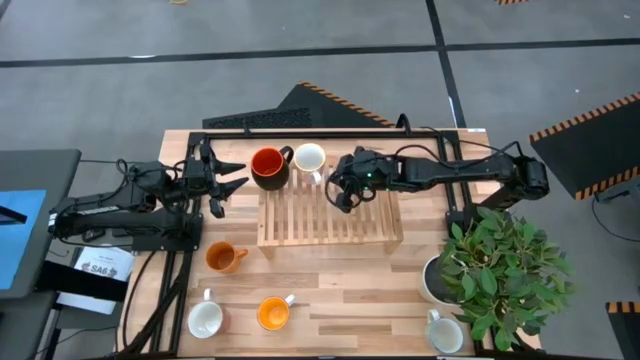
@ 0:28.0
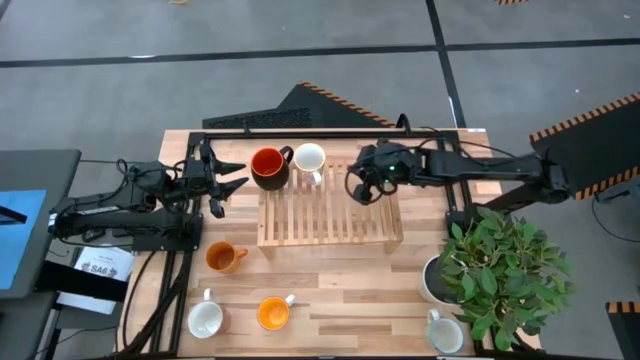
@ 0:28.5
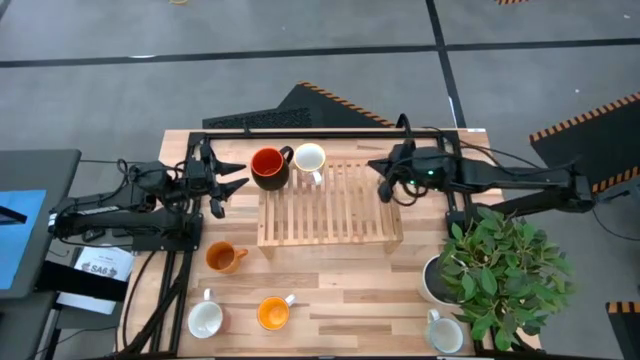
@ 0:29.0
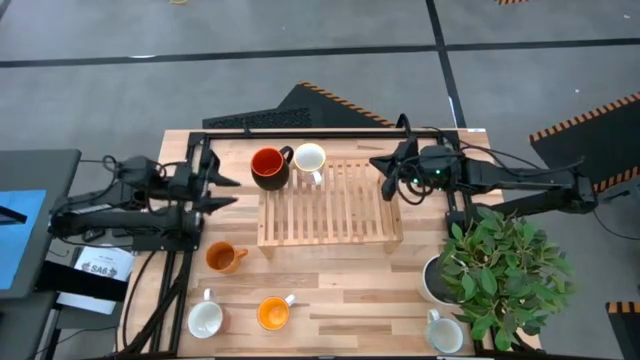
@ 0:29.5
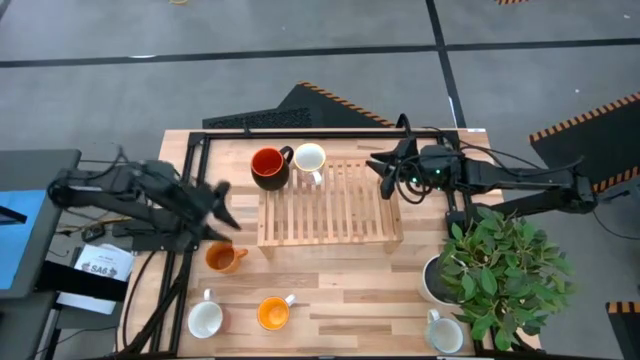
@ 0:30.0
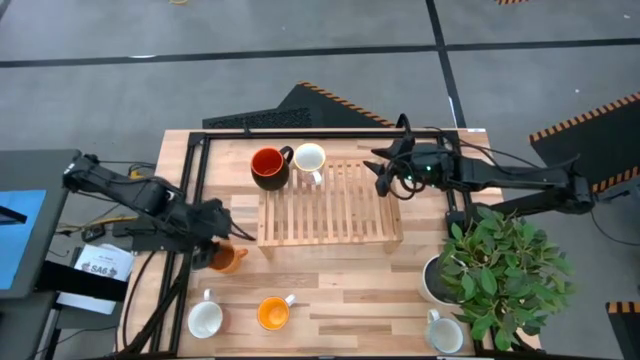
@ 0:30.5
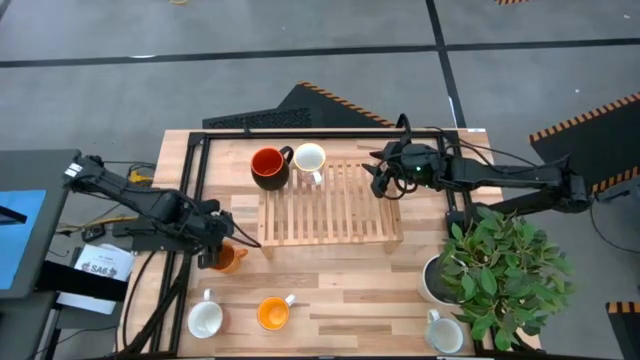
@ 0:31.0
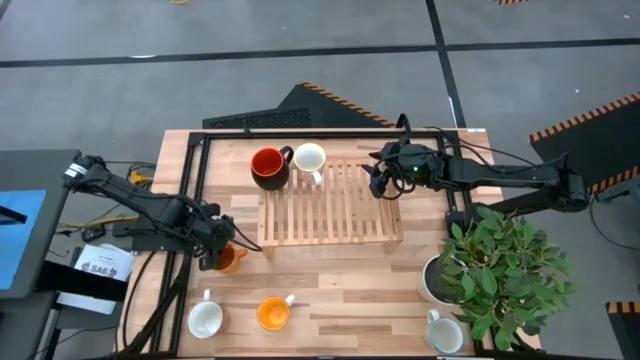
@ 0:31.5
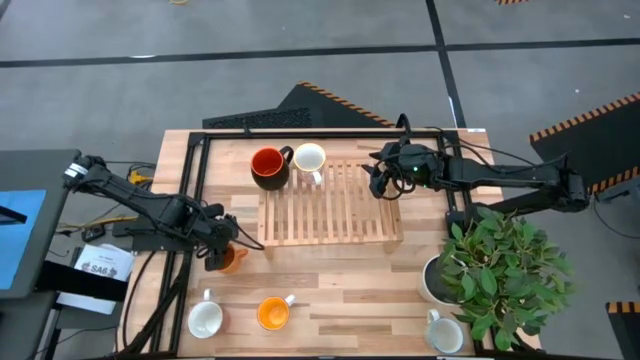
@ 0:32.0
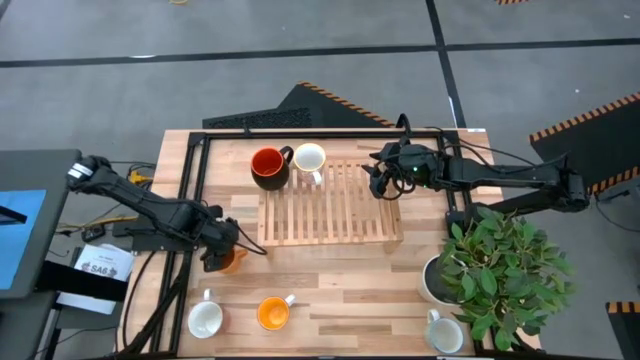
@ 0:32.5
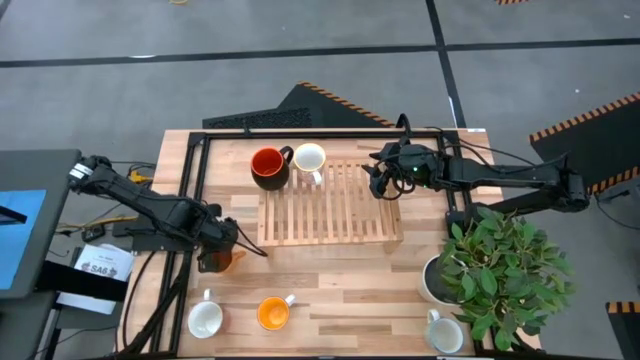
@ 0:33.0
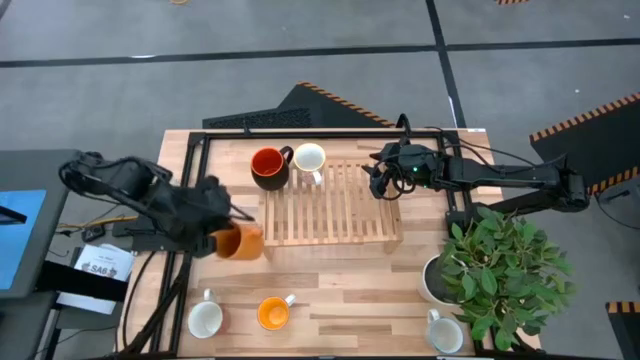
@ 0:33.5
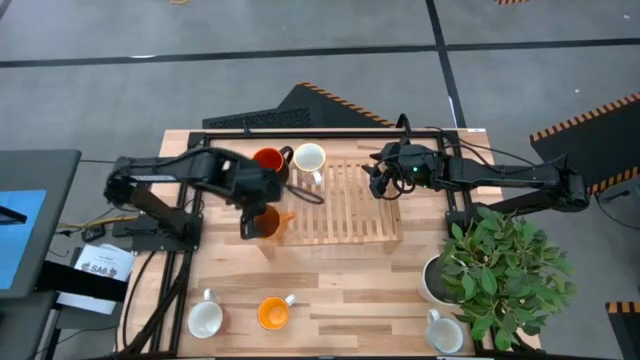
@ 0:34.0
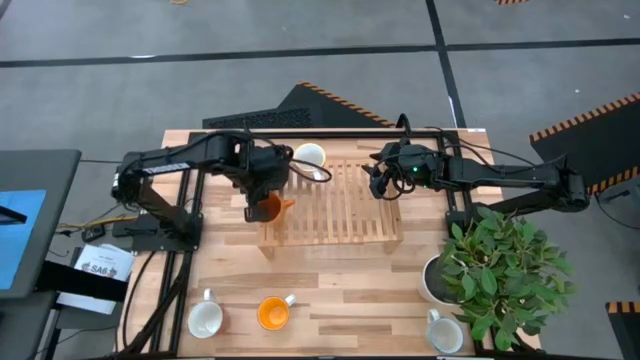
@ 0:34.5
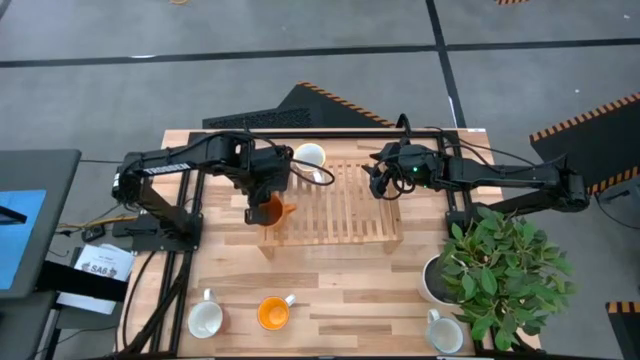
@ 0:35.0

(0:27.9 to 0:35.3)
Task: Place coffee mugs
Put the orange mug on the shelf

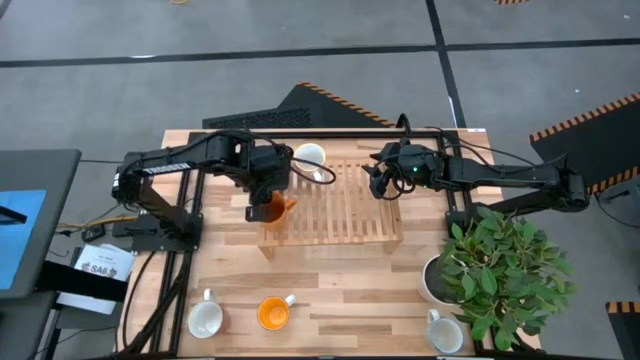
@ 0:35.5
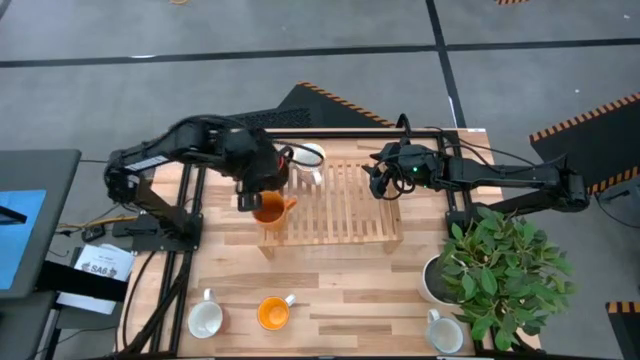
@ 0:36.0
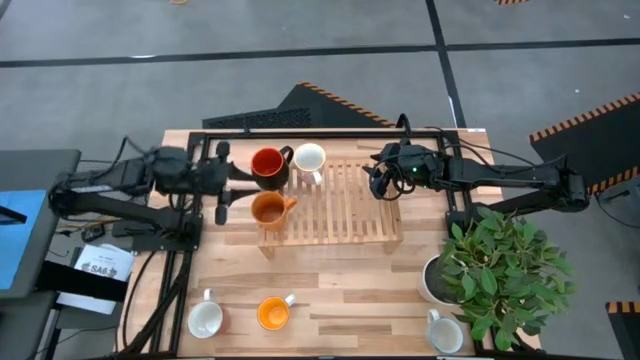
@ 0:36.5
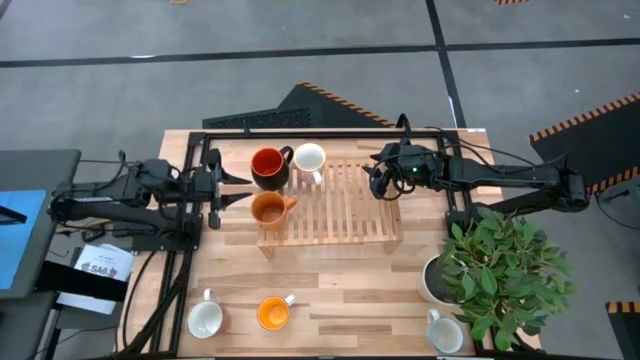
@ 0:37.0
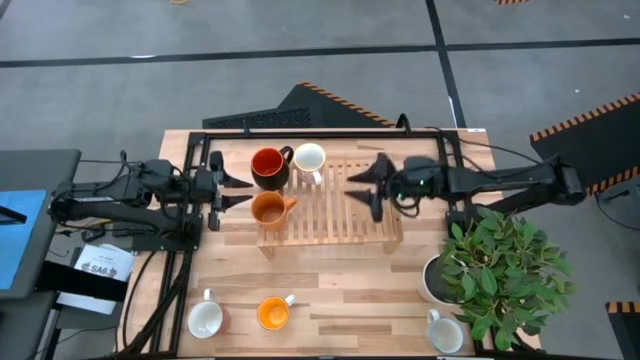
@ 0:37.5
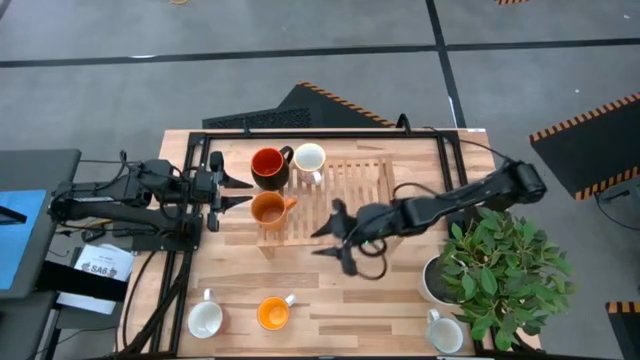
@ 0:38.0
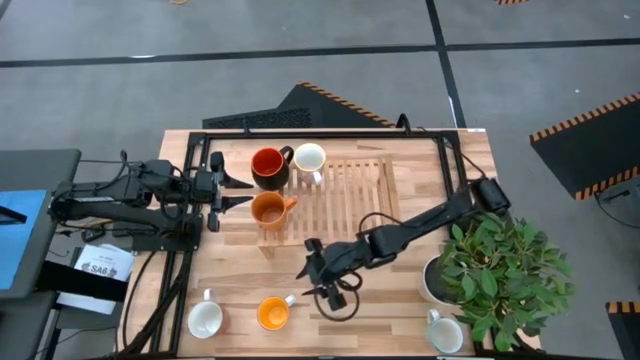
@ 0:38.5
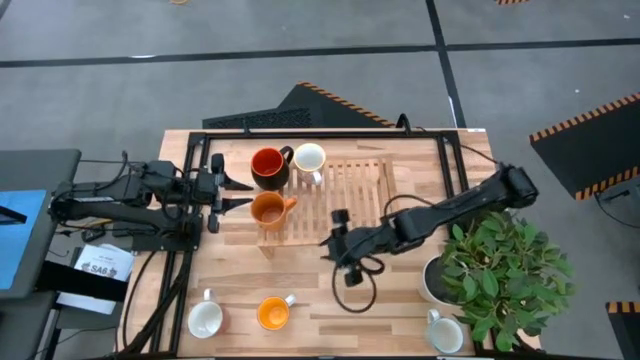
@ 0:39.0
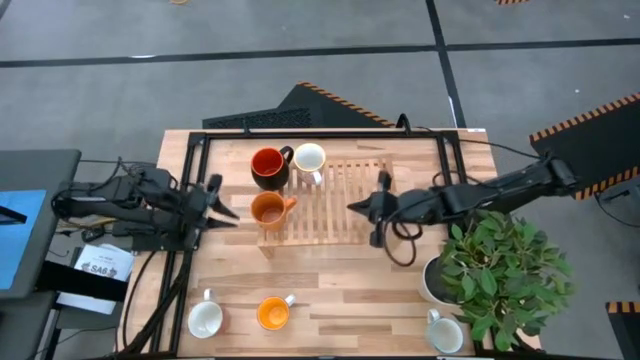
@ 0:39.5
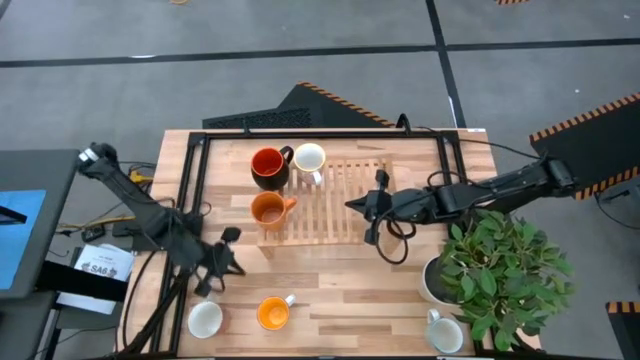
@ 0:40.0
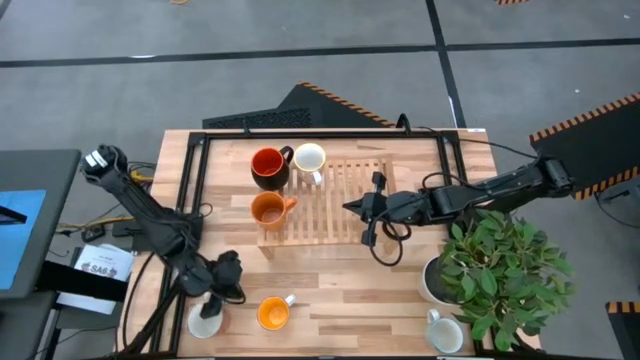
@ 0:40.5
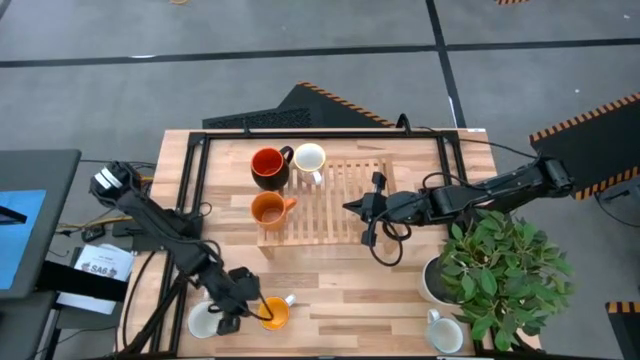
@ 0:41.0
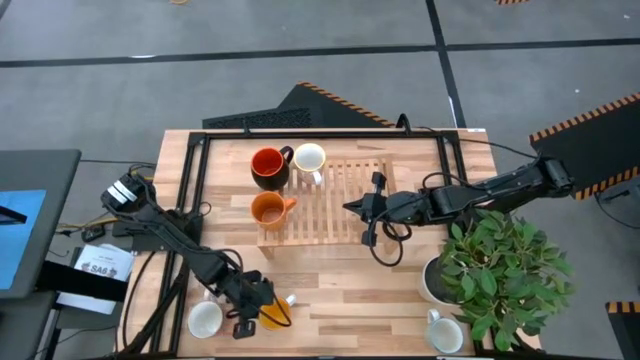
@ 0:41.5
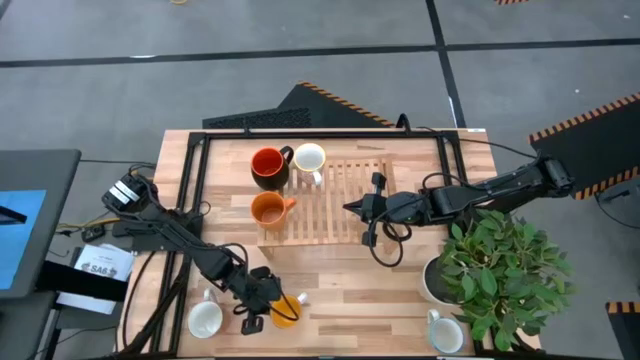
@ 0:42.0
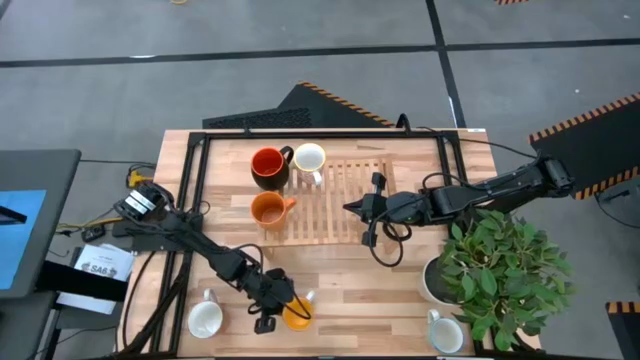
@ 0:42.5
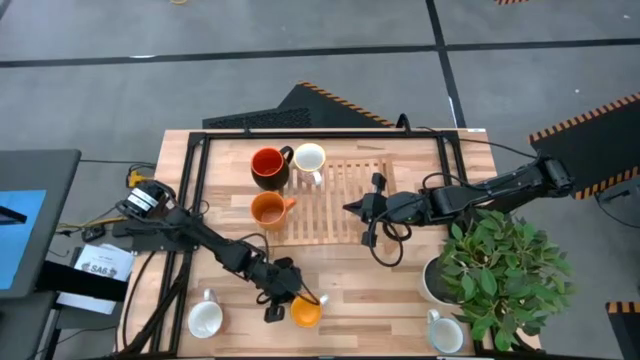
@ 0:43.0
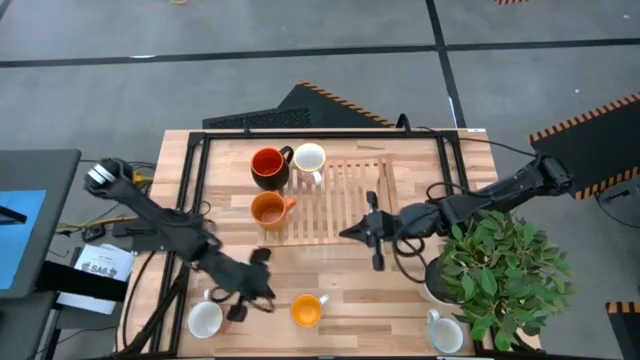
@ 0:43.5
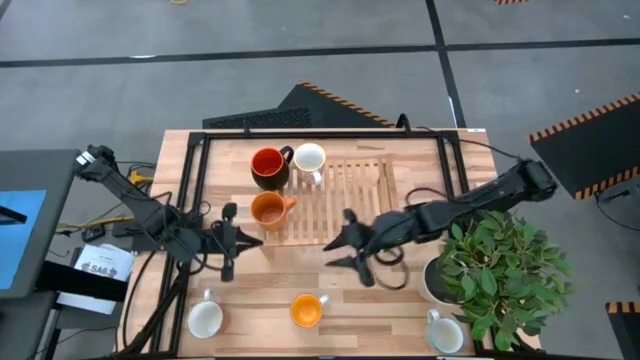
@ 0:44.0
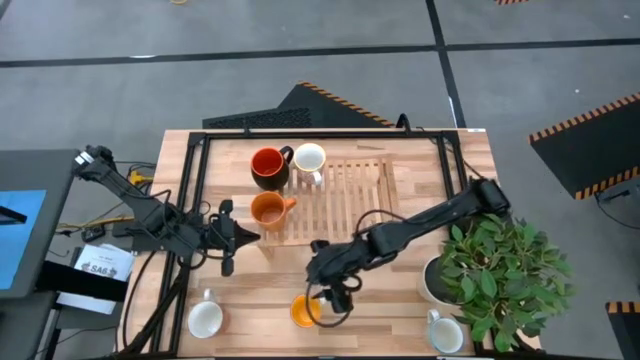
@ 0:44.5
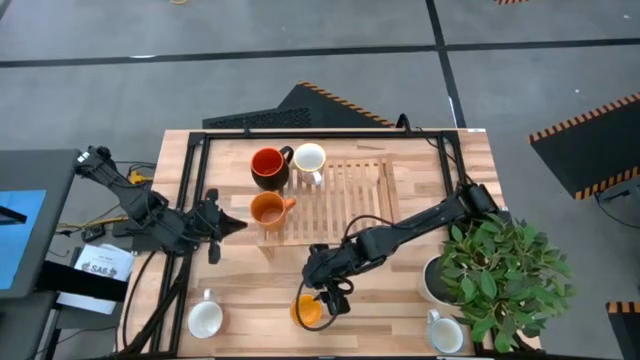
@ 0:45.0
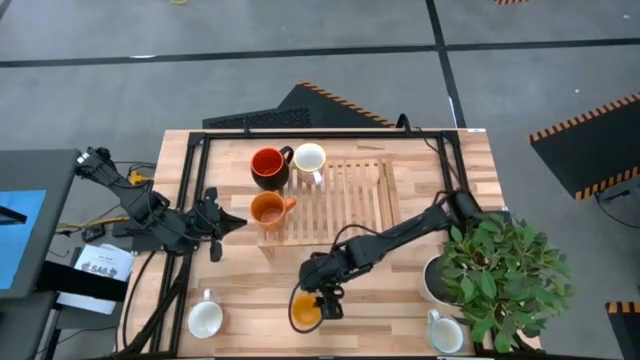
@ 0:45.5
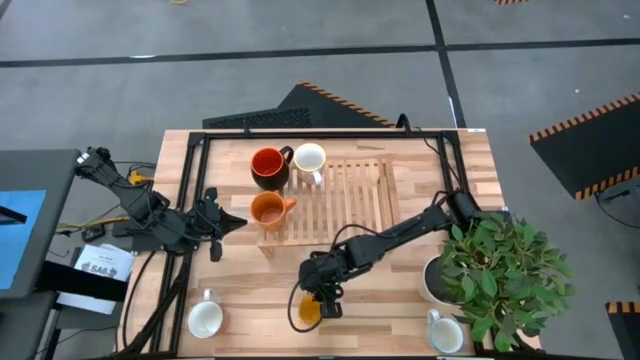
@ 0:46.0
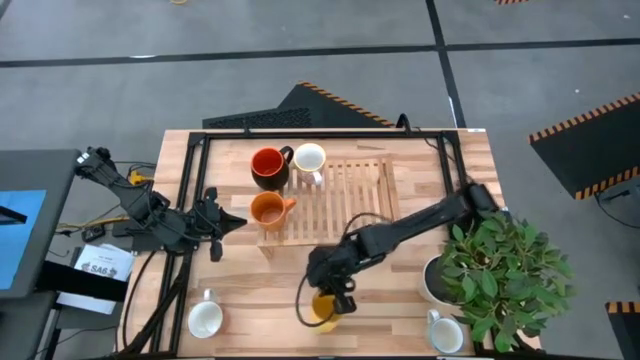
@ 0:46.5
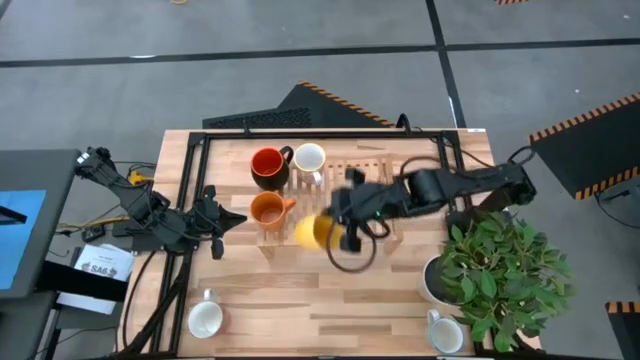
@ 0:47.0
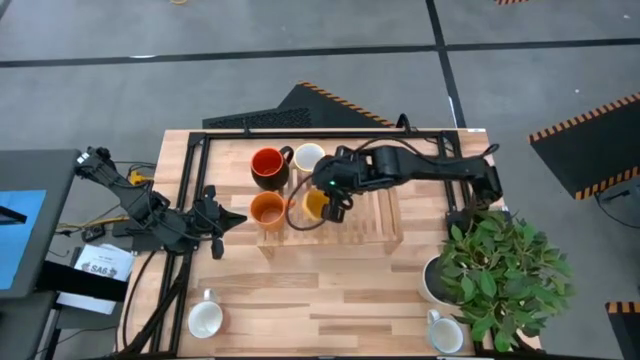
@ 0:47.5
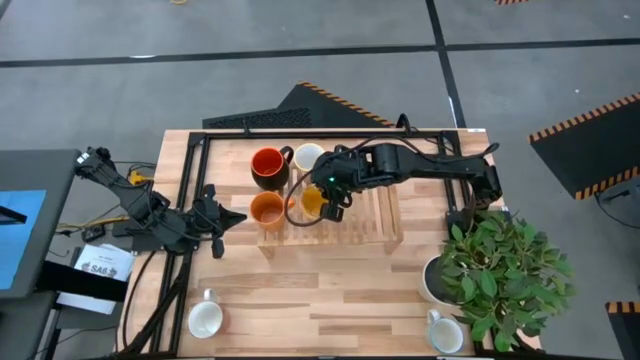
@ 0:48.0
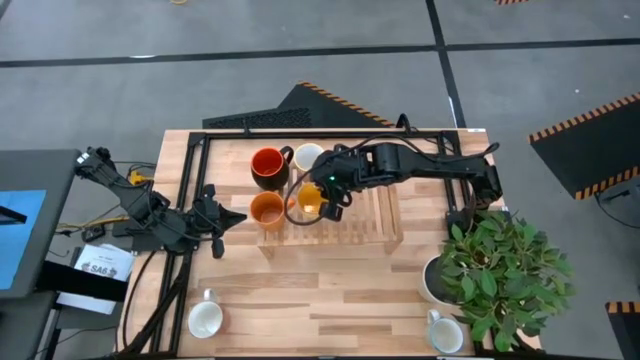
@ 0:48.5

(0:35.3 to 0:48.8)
Put the yellow mug on the shelf
